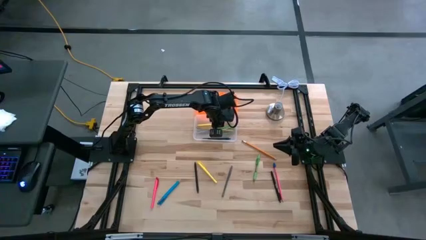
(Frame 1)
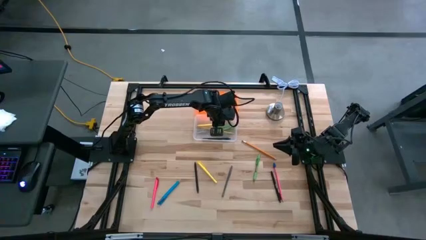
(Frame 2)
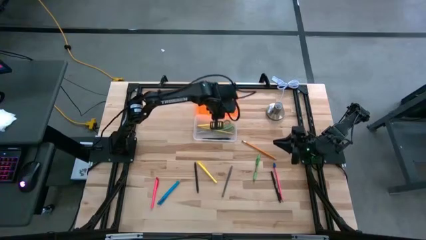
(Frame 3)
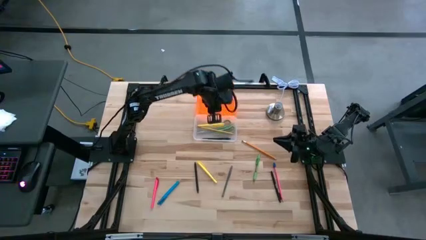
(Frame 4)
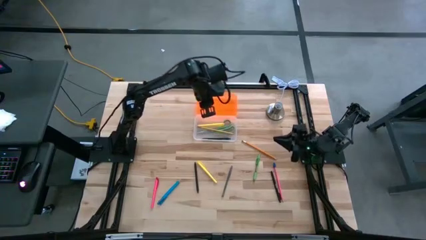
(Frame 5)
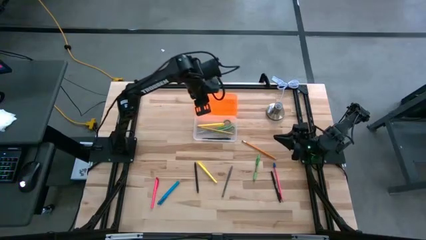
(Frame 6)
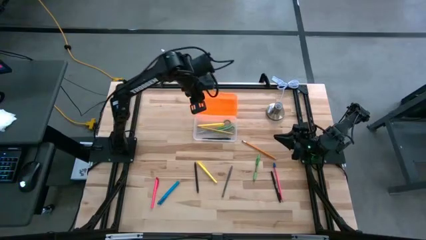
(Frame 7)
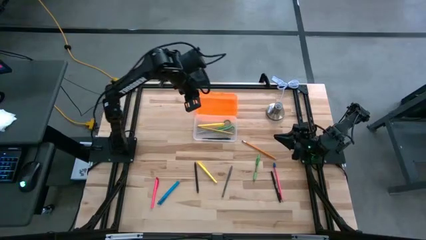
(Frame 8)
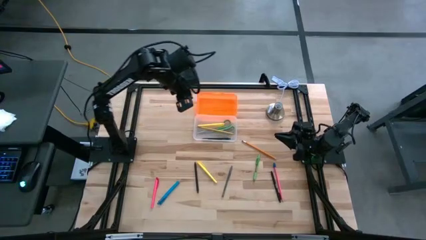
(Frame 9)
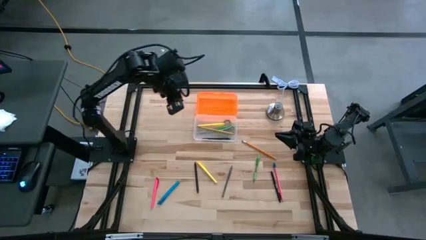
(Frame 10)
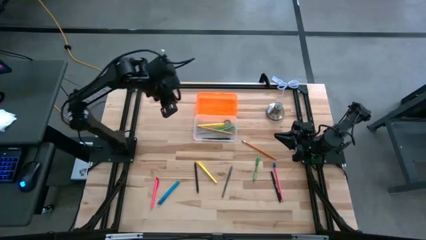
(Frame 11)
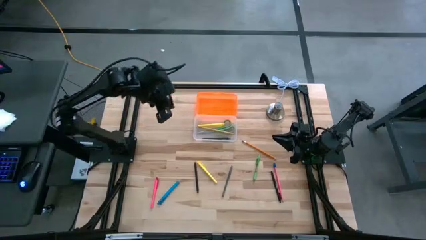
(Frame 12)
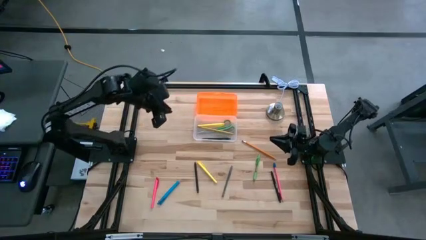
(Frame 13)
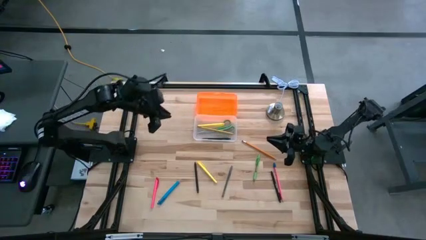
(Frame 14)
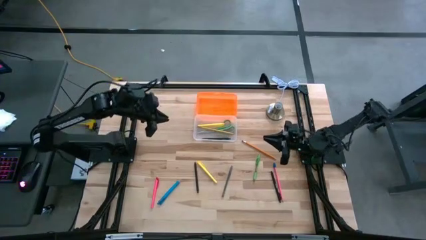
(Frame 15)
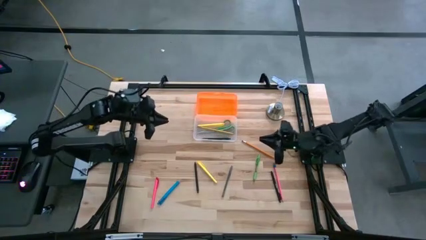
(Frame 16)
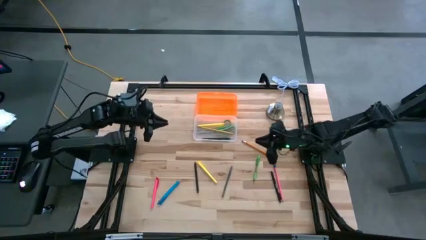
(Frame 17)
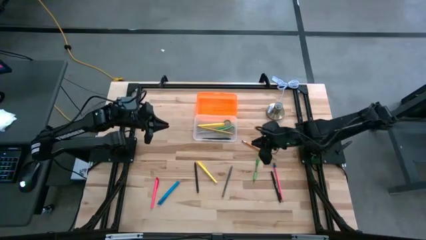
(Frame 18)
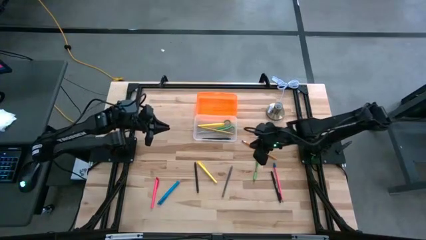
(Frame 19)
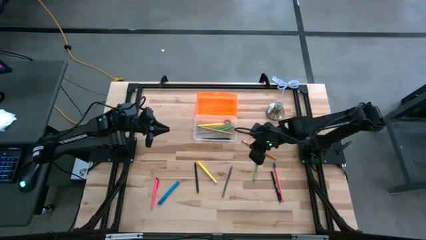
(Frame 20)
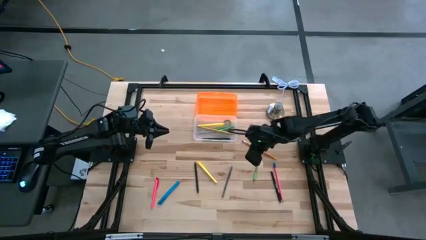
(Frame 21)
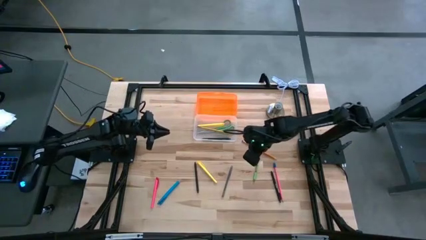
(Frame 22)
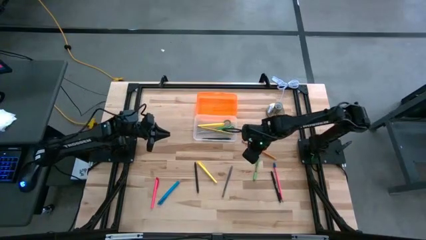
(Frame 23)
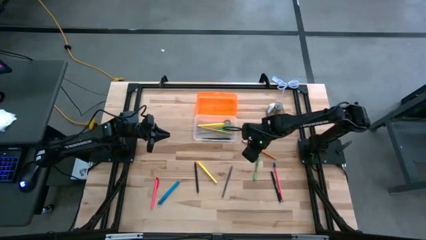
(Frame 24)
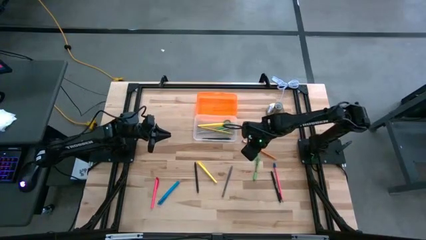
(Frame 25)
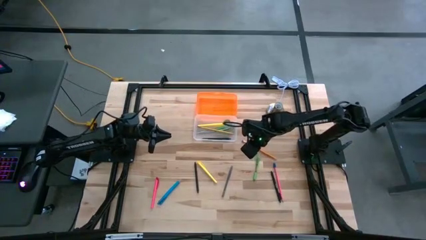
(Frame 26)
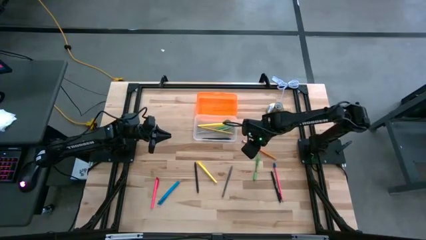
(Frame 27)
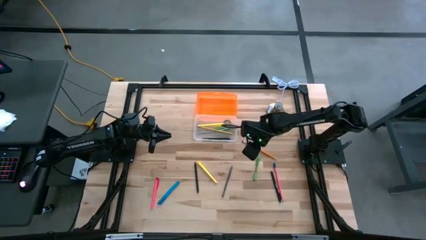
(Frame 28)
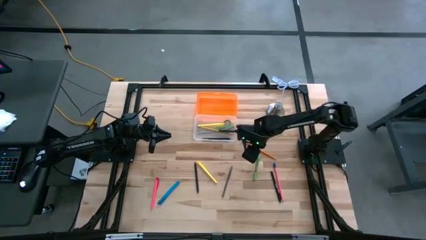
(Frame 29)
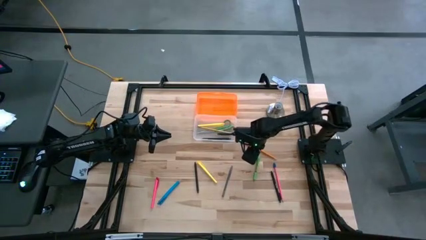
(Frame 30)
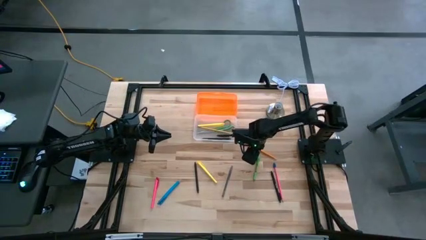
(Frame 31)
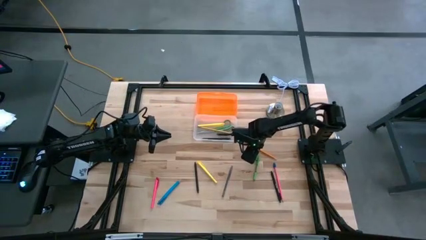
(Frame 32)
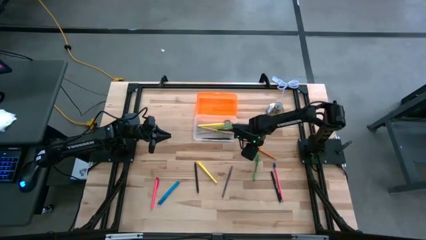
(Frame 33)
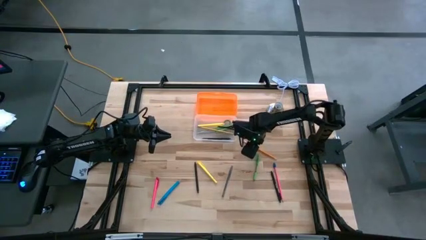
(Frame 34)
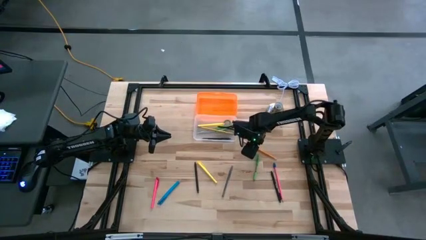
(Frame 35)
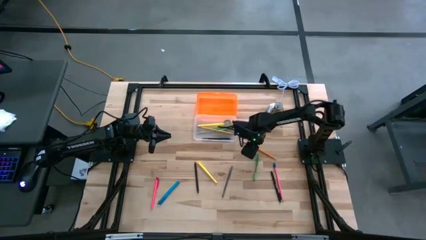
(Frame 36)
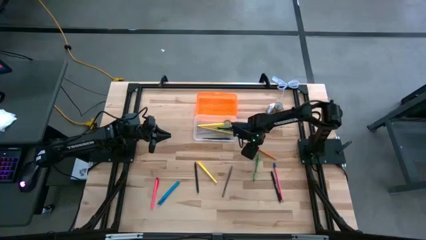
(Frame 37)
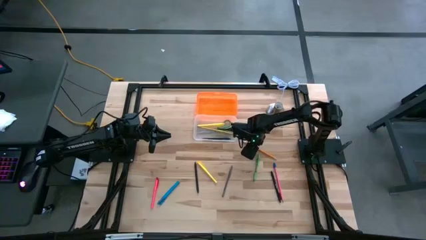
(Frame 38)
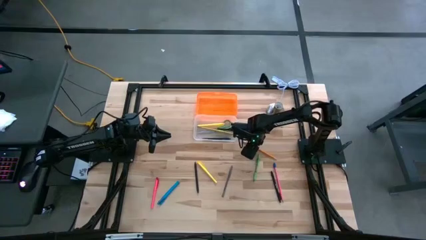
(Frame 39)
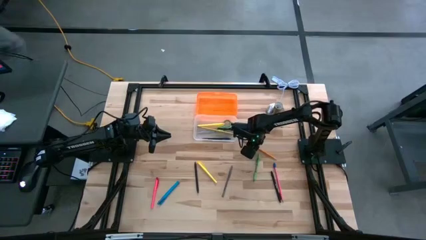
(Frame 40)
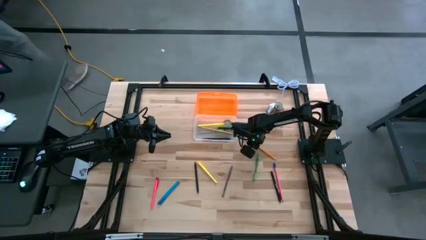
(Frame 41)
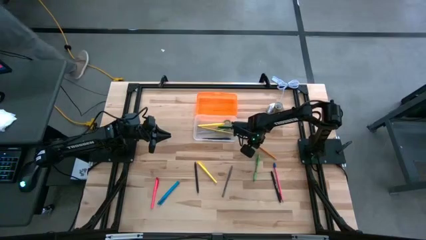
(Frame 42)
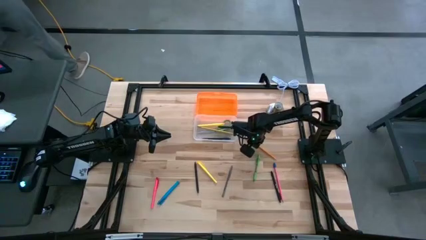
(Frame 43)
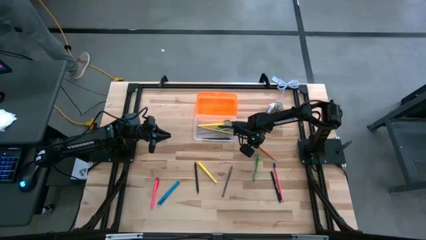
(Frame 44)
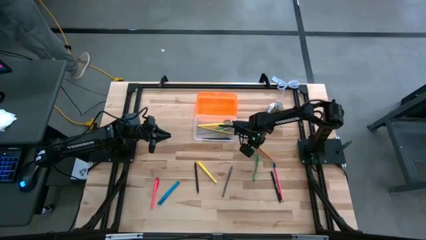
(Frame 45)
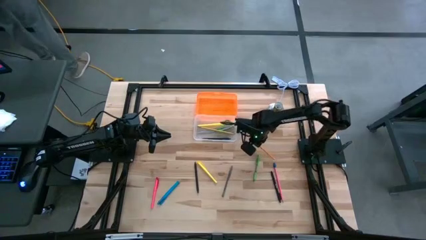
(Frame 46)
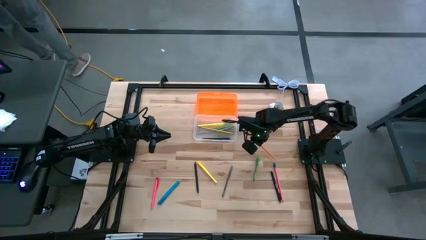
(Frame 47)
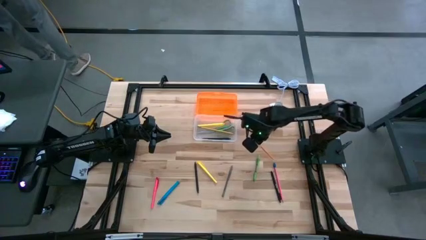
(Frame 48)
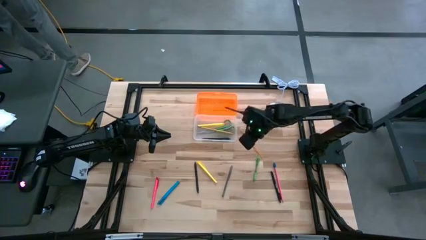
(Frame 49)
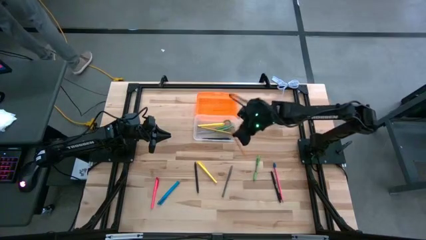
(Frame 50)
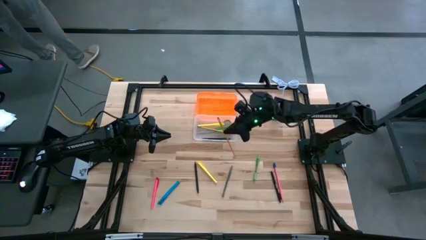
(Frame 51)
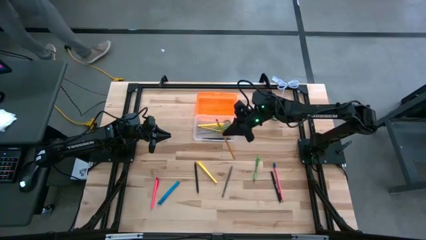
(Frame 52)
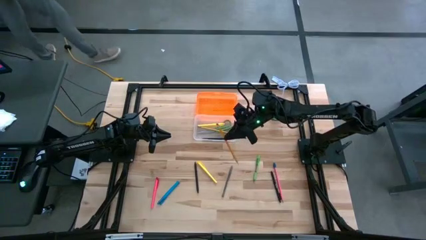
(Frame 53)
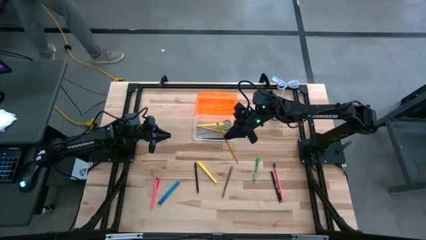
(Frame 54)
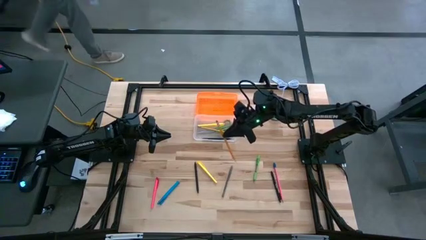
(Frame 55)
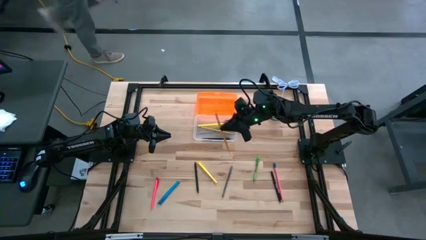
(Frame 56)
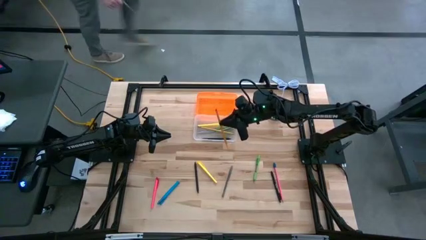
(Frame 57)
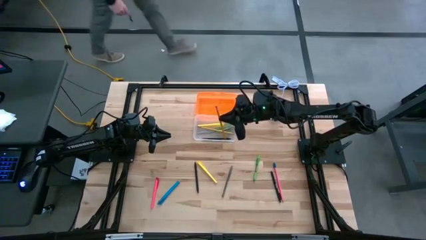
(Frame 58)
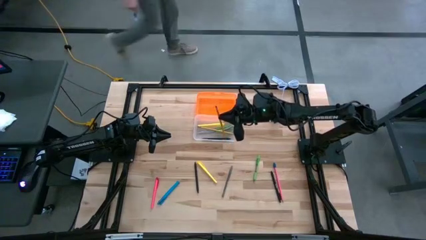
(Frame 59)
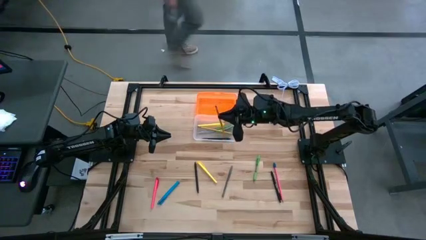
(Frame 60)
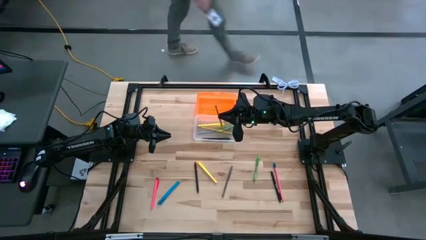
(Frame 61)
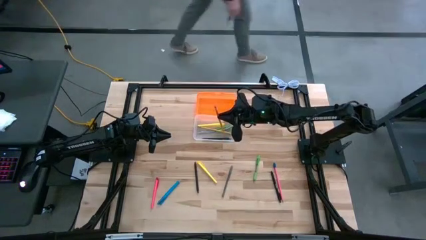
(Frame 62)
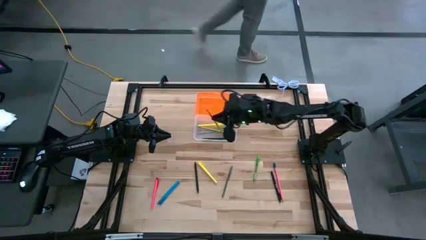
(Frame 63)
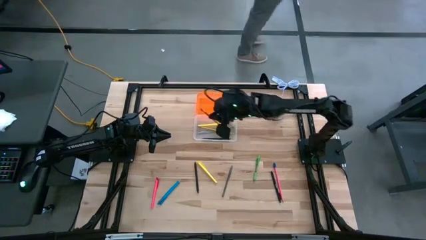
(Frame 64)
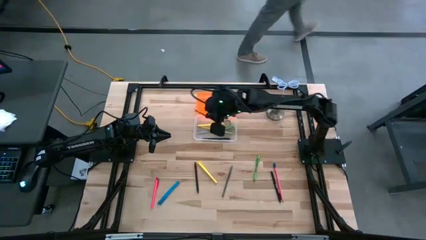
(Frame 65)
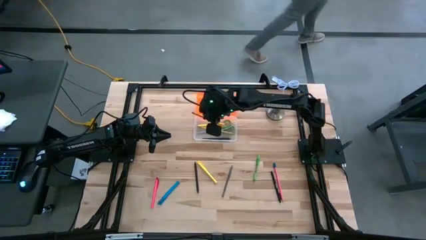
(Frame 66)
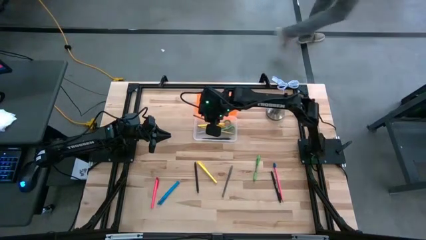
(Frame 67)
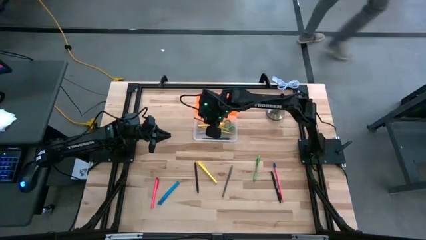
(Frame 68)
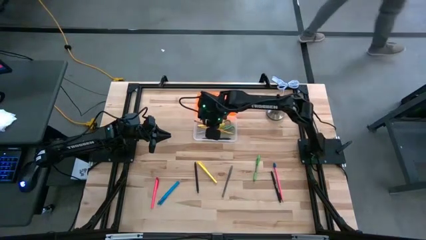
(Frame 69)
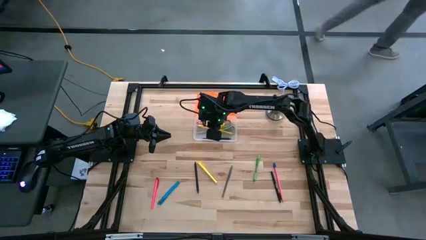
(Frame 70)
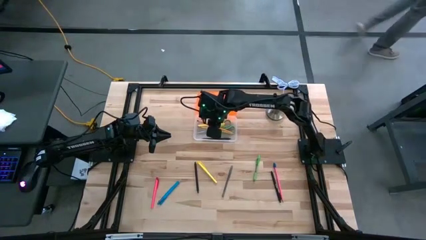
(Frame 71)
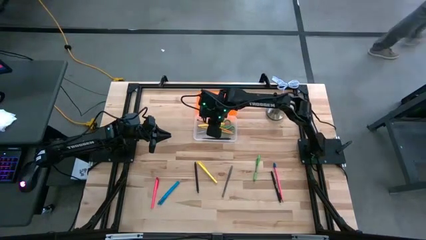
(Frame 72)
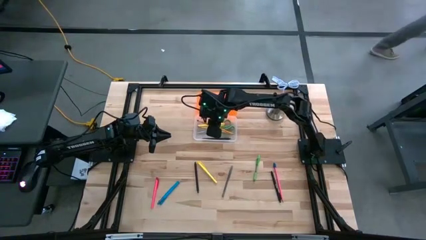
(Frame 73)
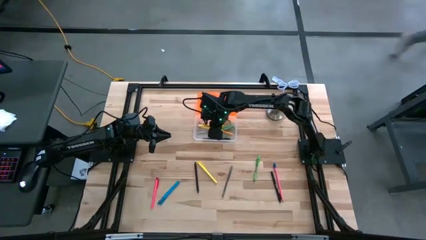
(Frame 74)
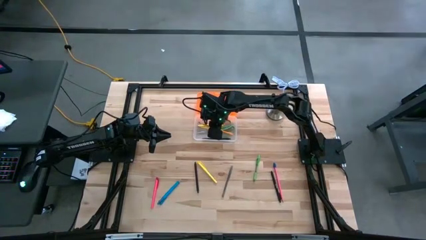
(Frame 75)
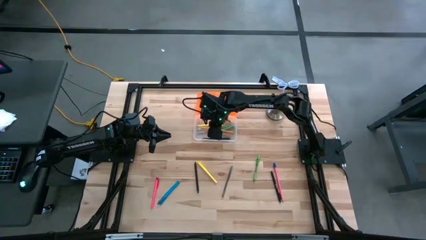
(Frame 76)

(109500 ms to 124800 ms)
Task: Pick & place school supplies into a supply box
Put the orange pencil into the orange supply box

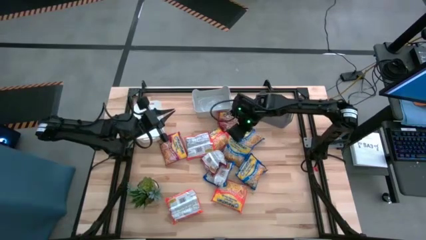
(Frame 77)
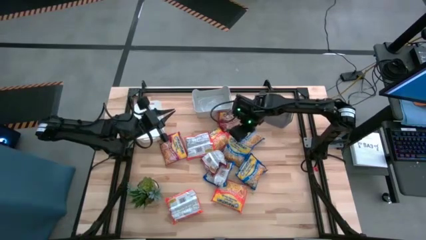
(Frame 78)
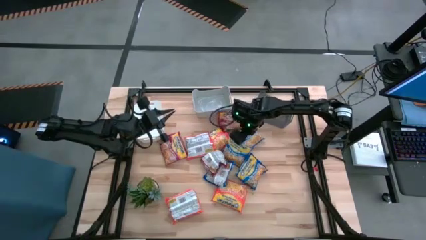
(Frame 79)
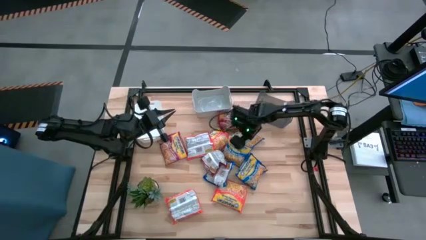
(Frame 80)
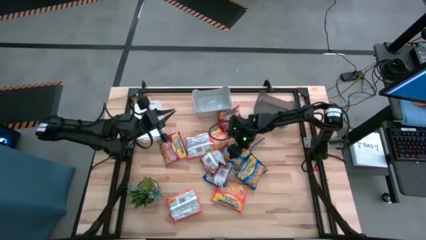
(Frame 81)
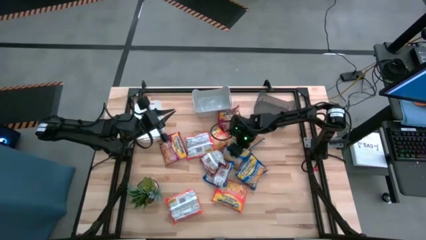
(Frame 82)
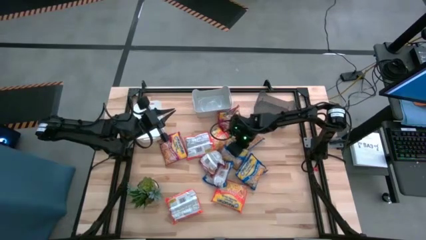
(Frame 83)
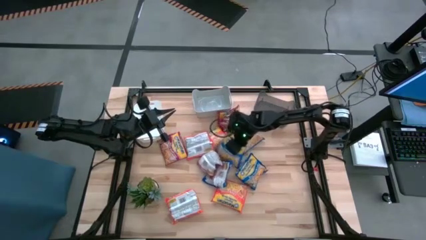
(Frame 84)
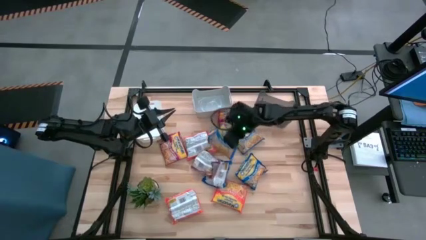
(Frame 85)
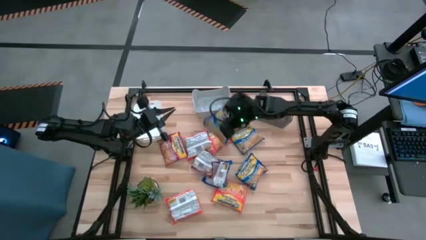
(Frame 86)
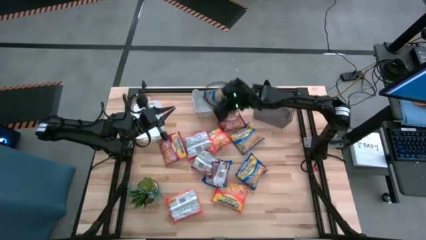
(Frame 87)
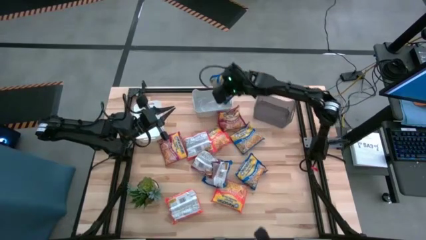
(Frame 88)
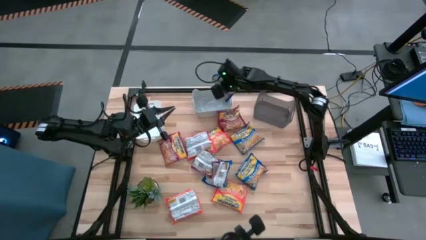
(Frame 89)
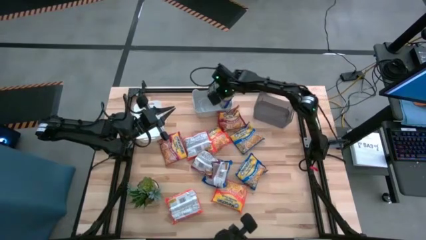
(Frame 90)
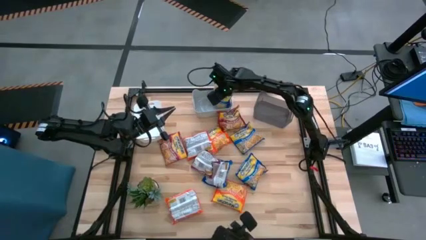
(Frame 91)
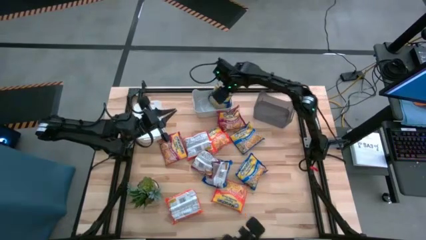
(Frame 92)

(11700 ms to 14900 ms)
Task: Sort Maruchan noodles
Put the middle blue noodle pack into the gray bin
